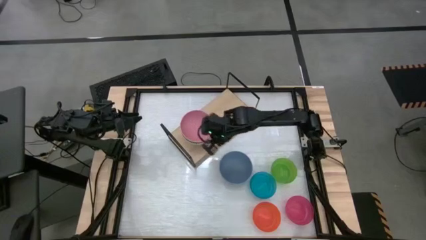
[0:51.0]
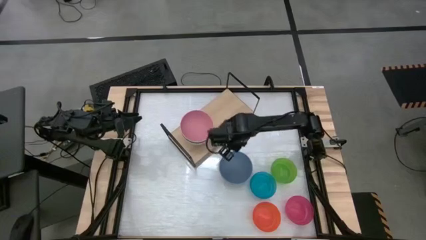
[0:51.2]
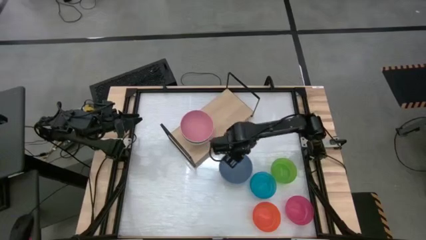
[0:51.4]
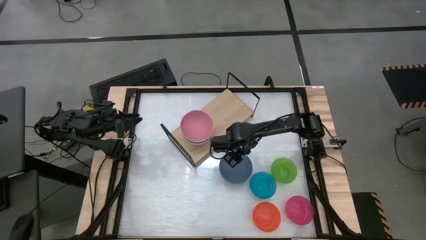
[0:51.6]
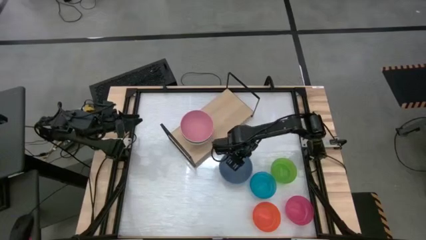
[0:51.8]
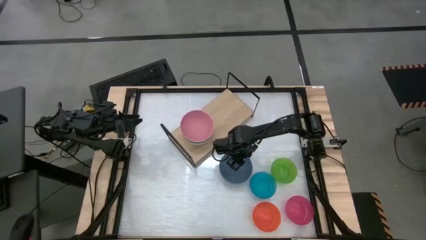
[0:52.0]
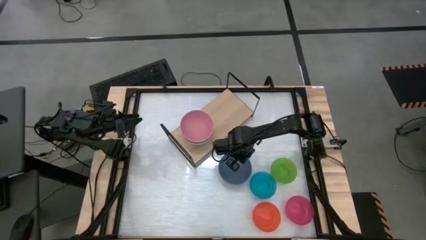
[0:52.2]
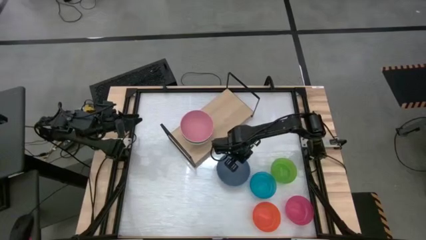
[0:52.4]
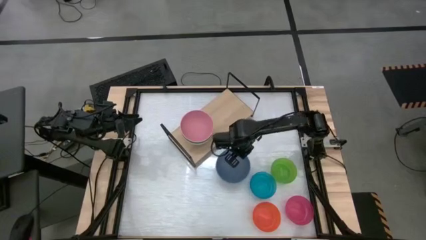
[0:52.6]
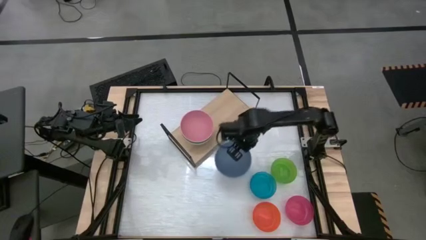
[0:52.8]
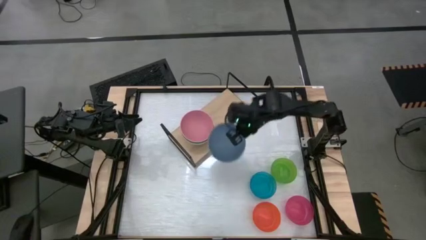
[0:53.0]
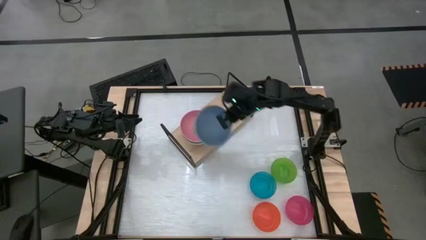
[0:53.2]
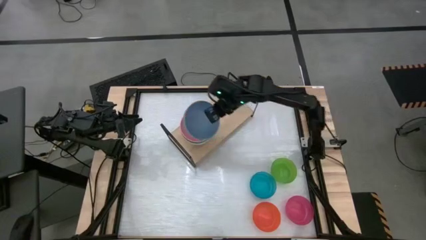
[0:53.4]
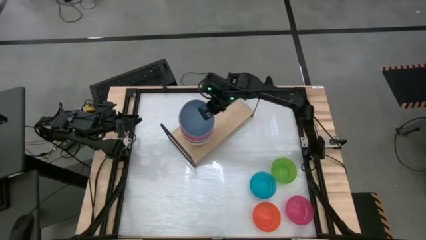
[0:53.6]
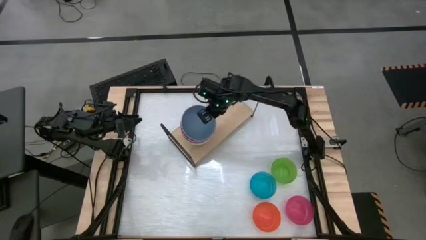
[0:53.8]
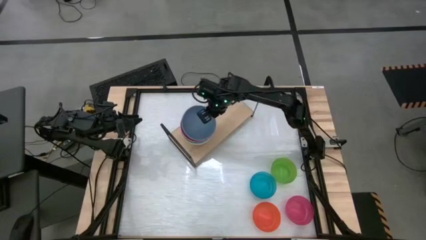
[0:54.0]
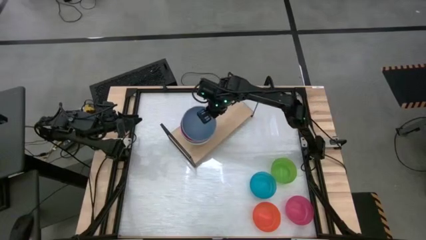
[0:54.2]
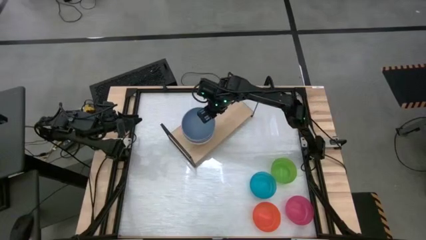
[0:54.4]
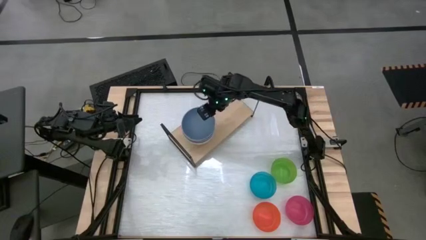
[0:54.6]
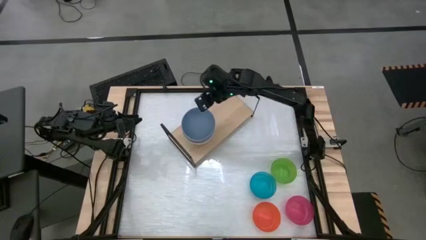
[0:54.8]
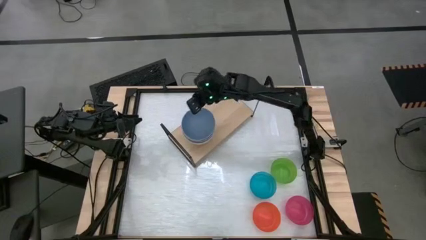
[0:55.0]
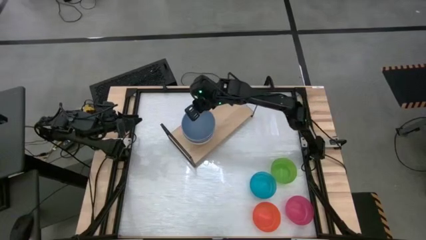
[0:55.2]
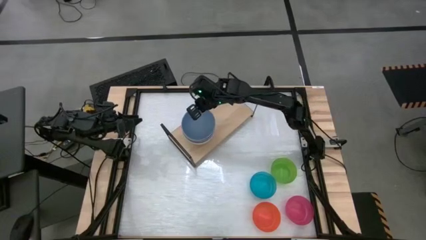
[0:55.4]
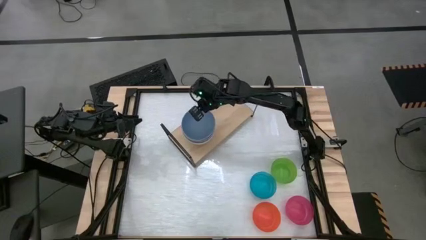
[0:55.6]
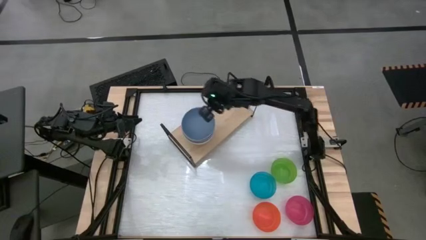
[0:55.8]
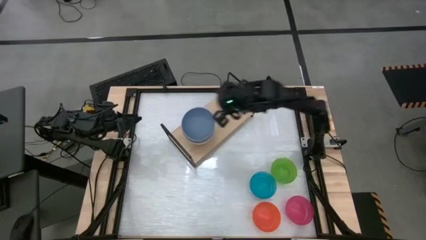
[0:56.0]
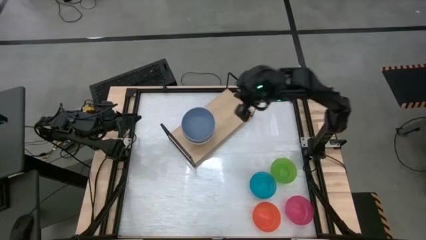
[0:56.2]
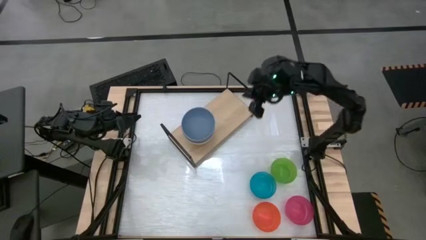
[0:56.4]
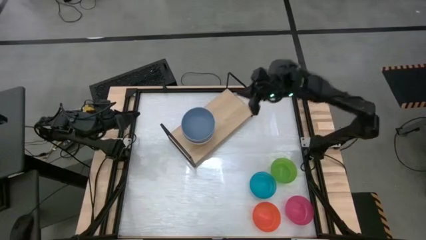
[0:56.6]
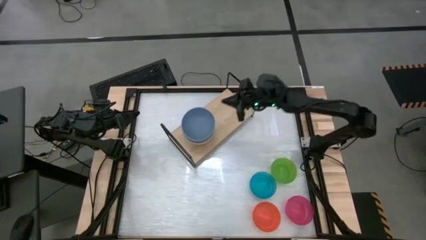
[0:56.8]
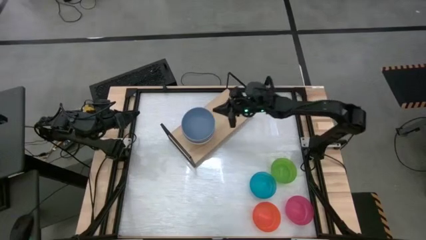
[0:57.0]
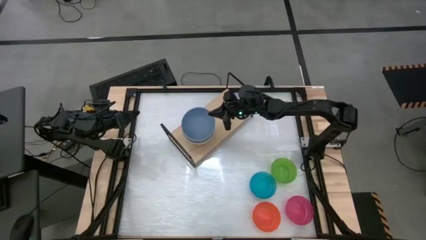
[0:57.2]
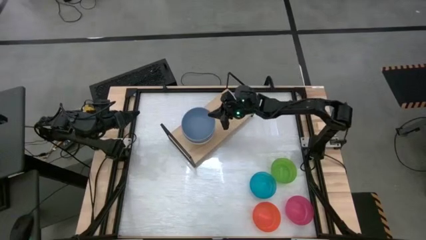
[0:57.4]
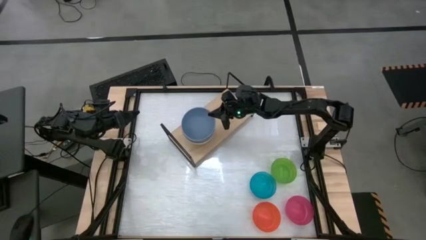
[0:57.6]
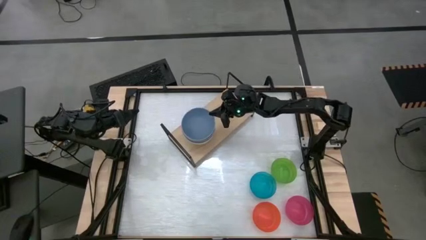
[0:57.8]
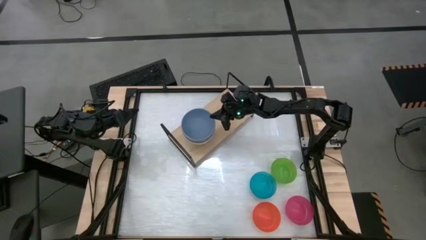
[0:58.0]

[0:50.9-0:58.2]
Task: Place and stack bowls onto a shelf
Stack the blue bowl on top of the pink bowl on the shelf

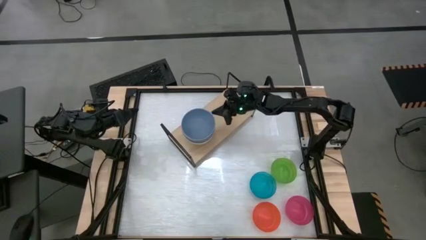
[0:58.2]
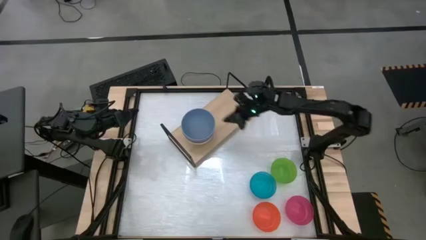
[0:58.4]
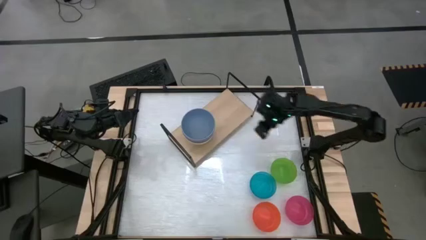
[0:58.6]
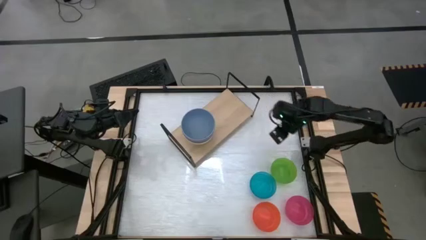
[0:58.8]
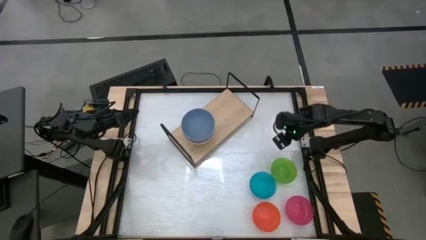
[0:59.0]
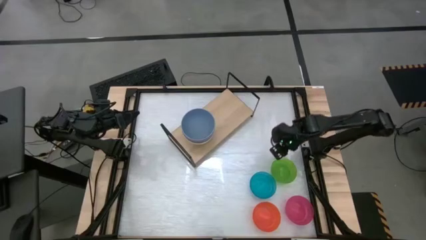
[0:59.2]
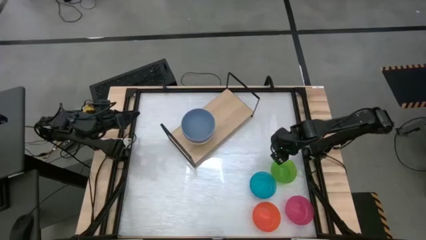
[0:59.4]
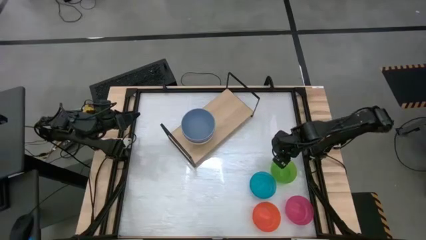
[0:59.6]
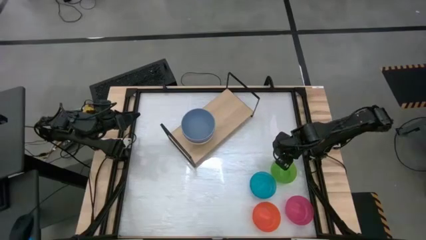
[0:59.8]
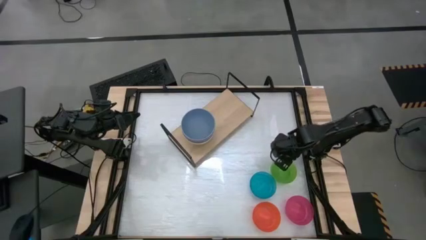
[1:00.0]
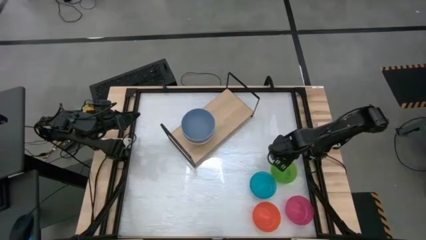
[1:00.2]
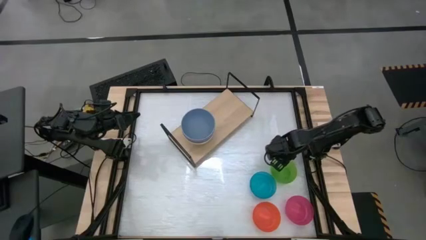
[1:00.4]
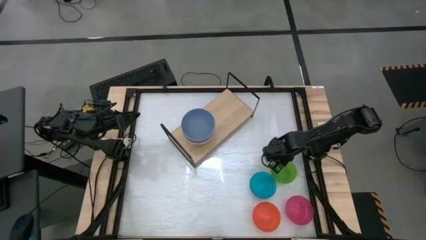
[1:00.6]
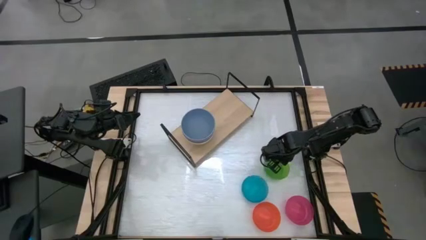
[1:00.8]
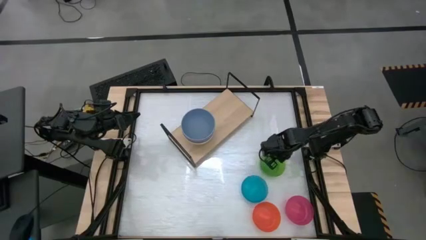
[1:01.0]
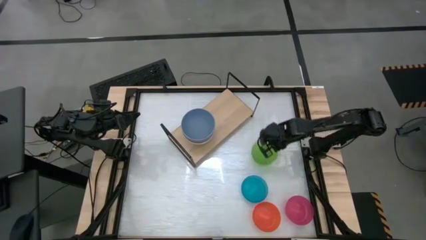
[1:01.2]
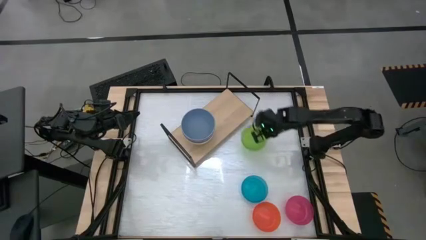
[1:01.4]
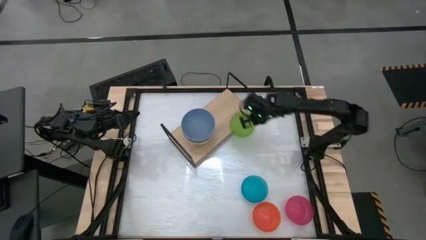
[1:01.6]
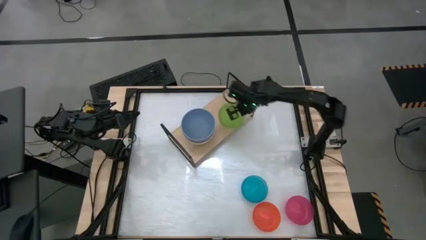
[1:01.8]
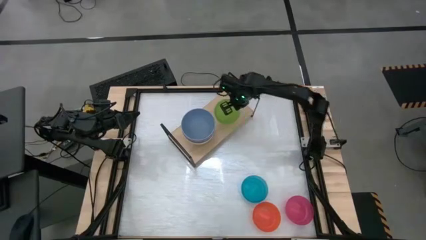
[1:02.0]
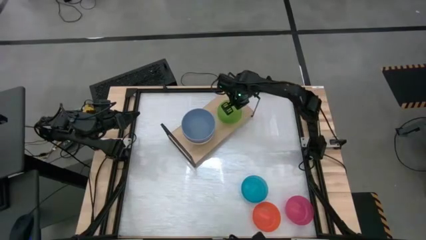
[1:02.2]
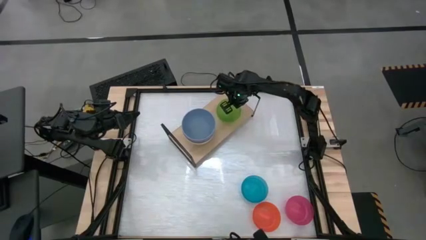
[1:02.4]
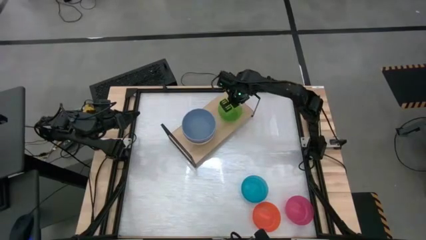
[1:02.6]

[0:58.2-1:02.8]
Put the green bowl on the shelf

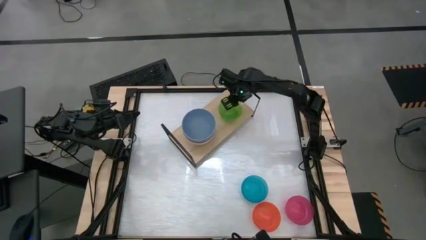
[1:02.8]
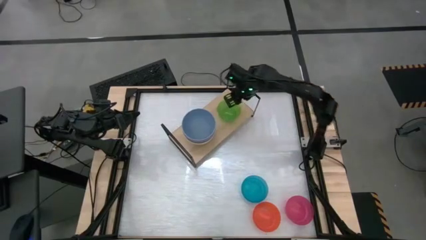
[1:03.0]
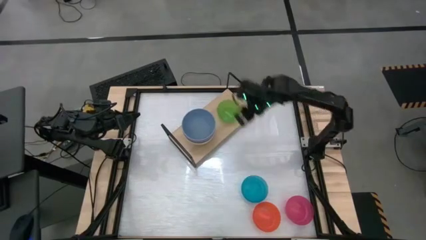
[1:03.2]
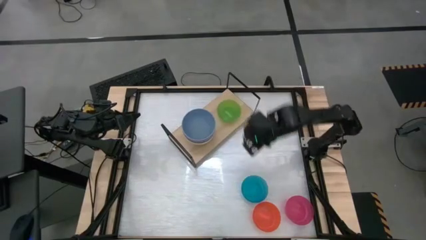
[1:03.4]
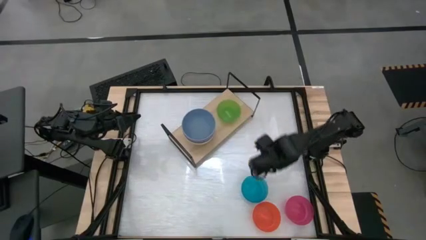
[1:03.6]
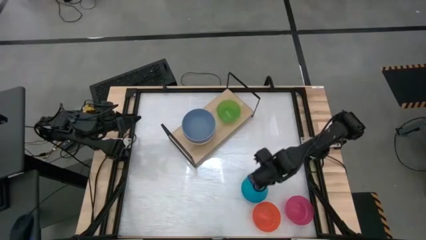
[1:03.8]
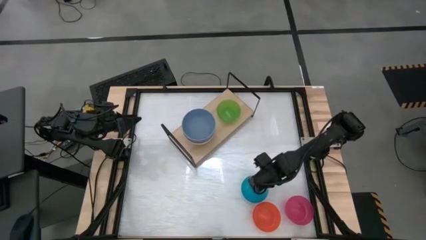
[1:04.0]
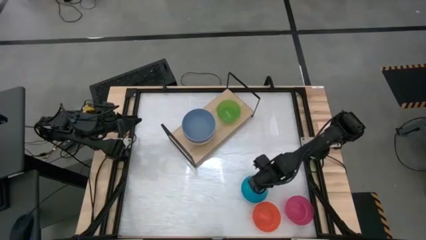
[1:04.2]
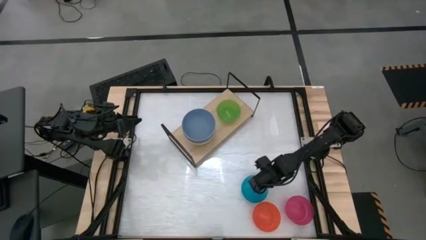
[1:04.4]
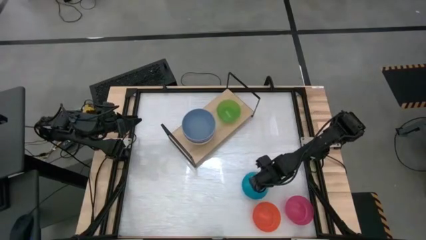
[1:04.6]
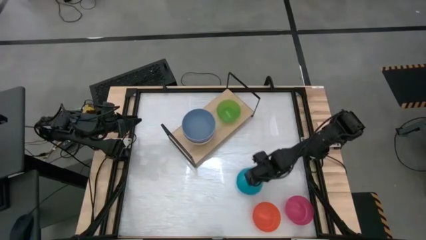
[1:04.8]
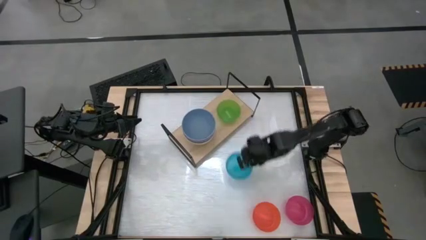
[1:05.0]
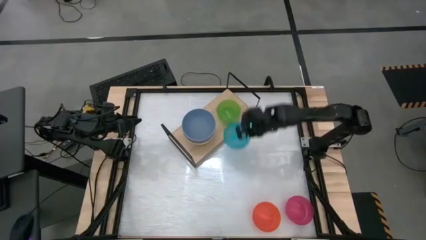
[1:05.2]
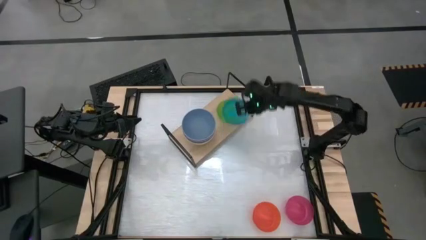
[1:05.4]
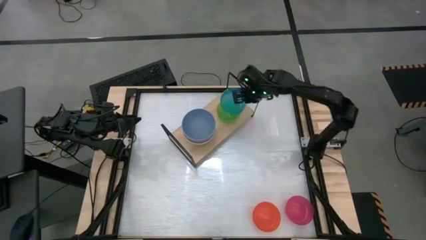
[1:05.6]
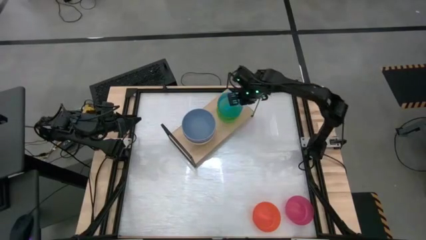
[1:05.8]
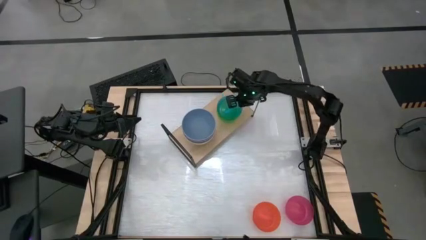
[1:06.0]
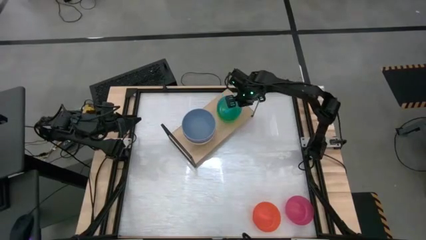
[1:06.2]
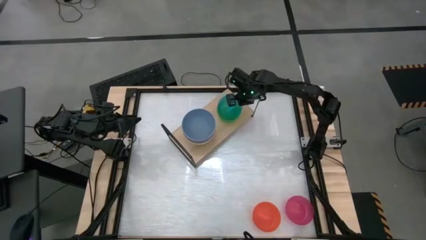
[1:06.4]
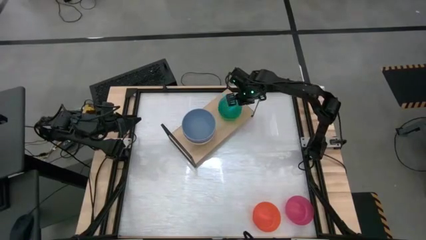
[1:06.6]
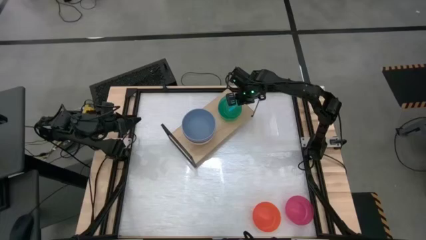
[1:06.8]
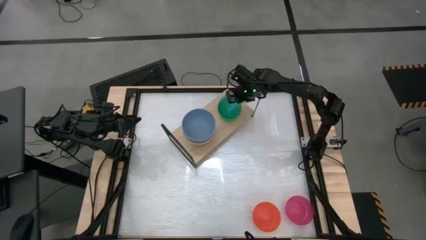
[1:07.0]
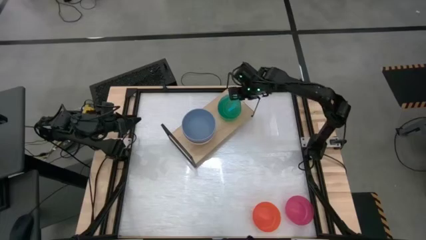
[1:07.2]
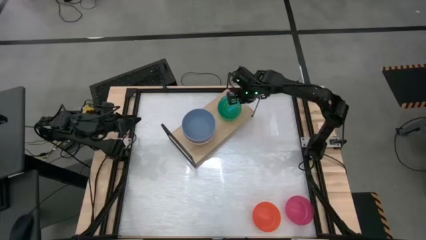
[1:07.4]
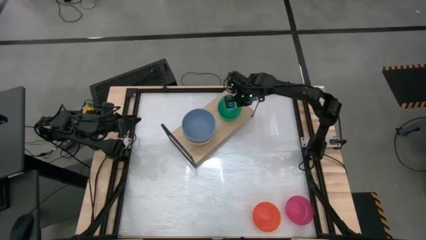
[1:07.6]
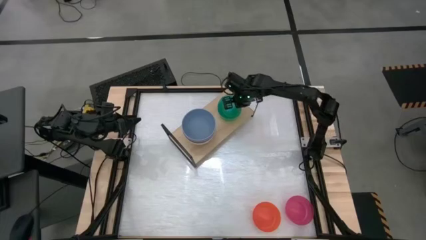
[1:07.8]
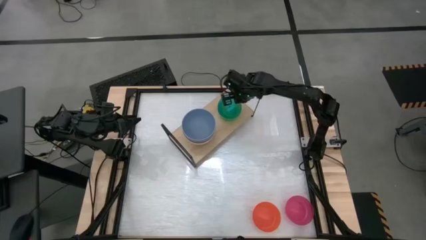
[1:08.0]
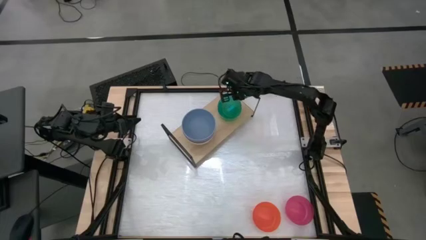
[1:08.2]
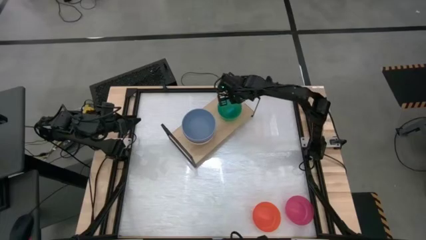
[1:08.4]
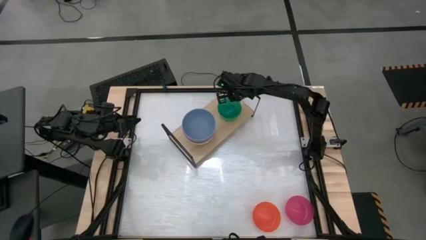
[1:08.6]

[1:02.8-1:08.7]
Stack the light blue bowl on top of the green bowl on the shelf
